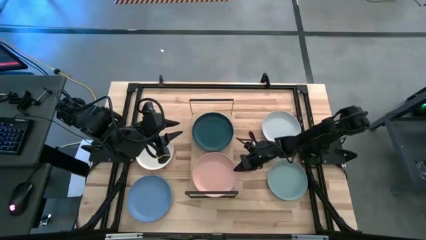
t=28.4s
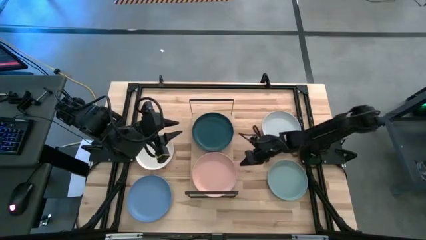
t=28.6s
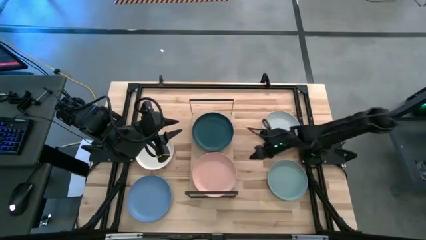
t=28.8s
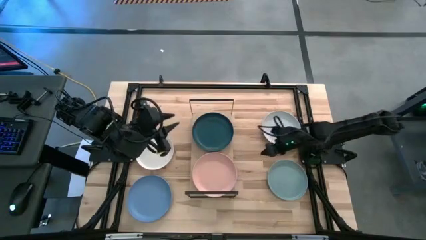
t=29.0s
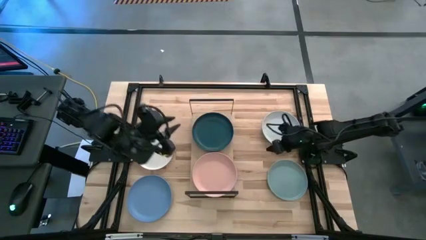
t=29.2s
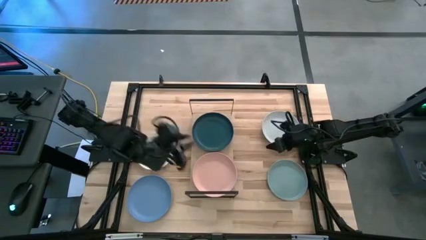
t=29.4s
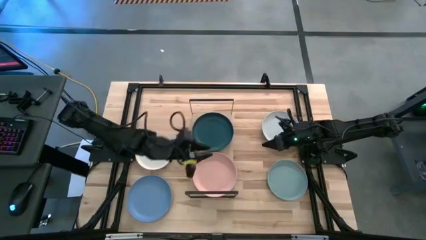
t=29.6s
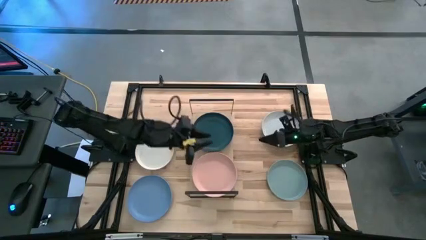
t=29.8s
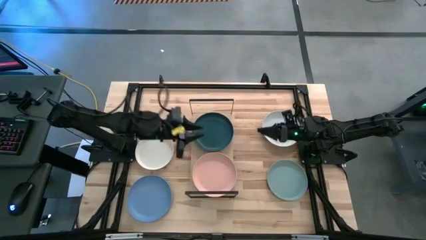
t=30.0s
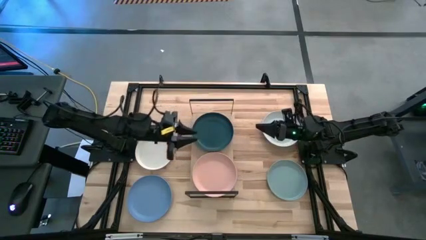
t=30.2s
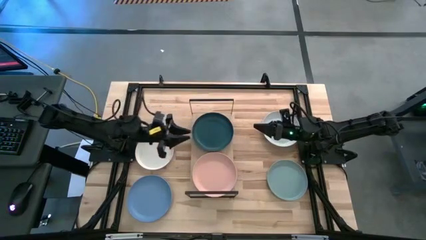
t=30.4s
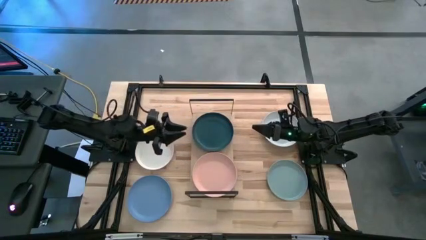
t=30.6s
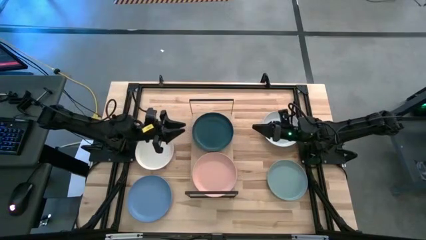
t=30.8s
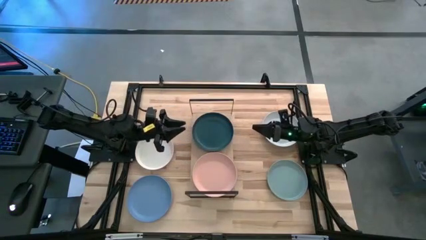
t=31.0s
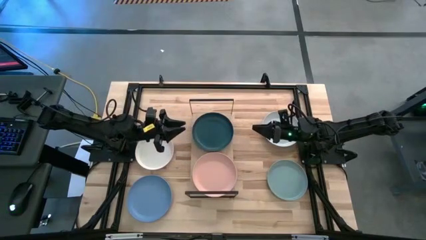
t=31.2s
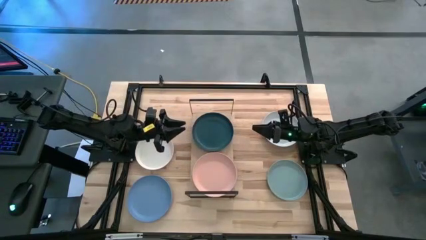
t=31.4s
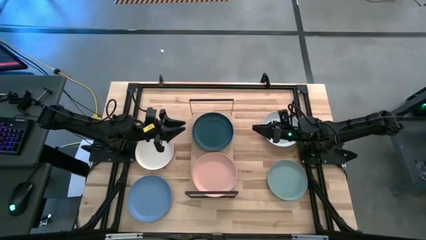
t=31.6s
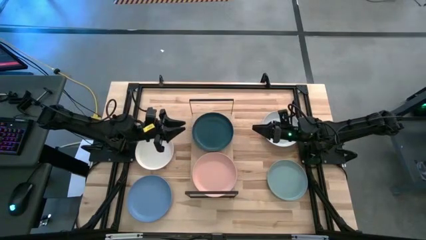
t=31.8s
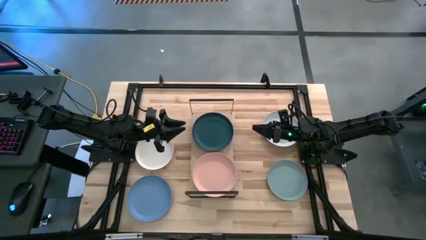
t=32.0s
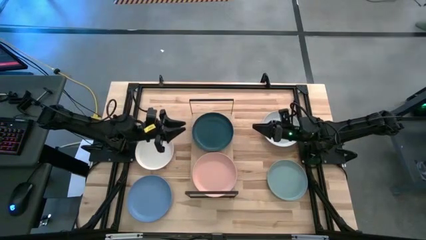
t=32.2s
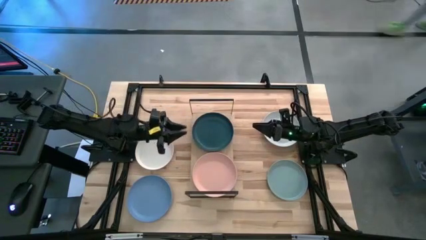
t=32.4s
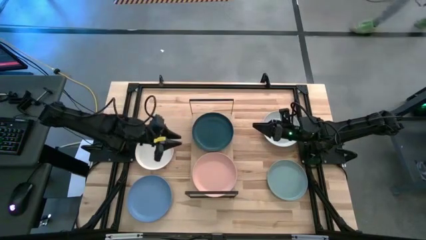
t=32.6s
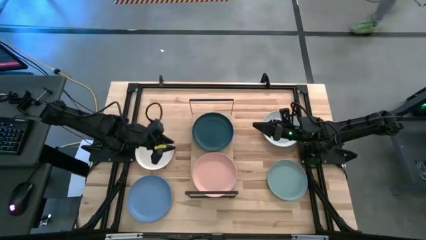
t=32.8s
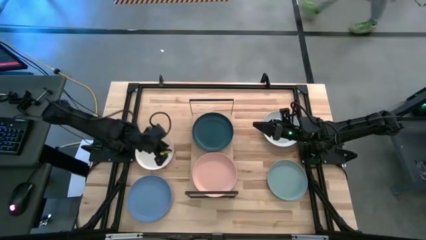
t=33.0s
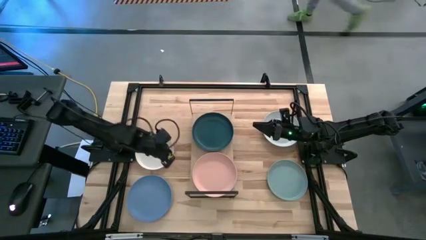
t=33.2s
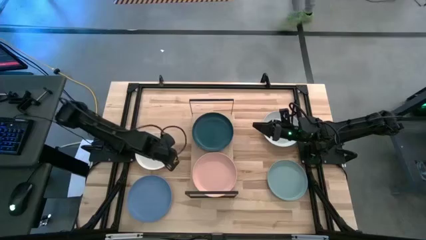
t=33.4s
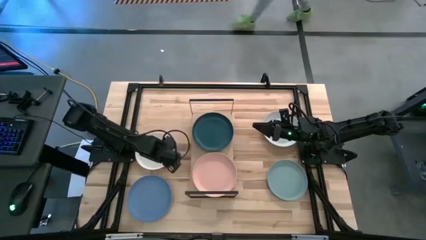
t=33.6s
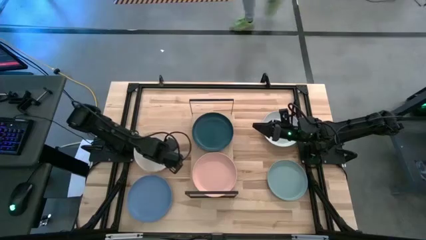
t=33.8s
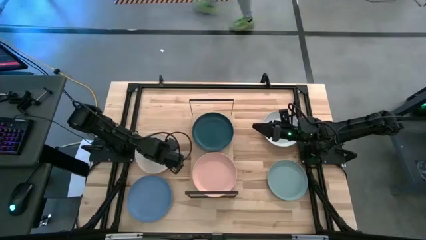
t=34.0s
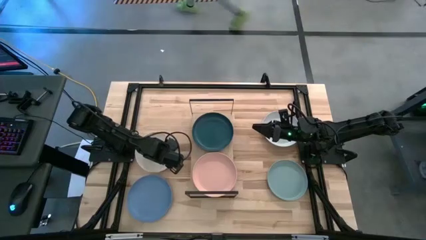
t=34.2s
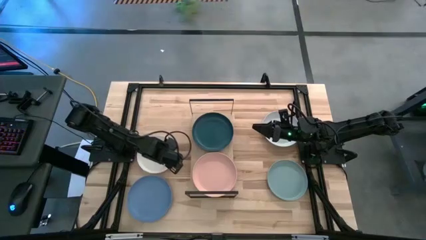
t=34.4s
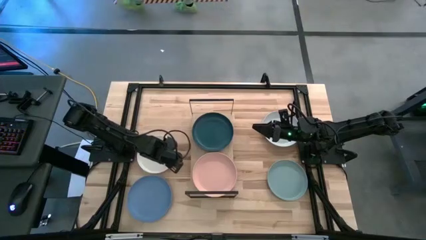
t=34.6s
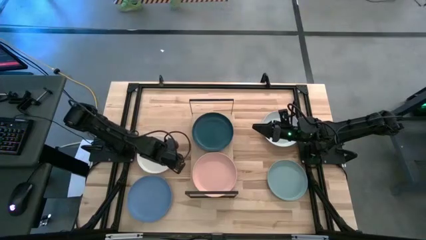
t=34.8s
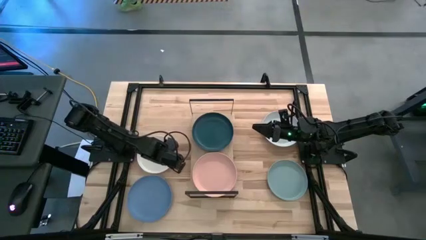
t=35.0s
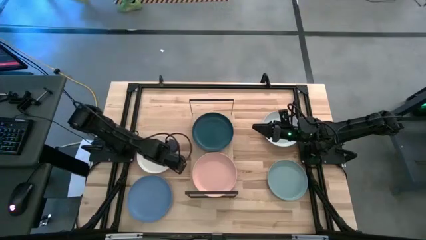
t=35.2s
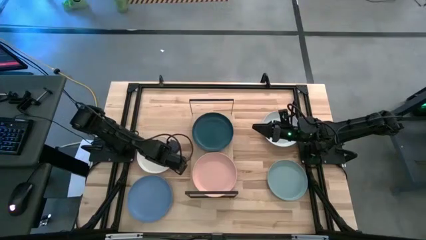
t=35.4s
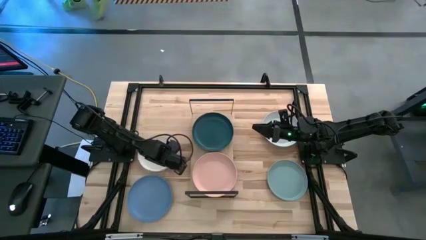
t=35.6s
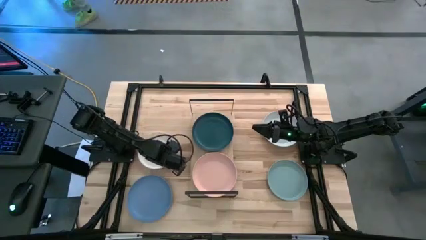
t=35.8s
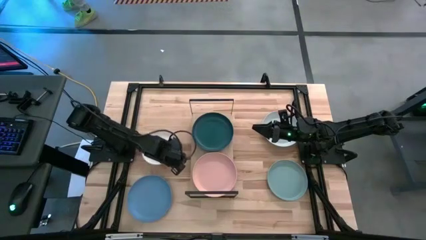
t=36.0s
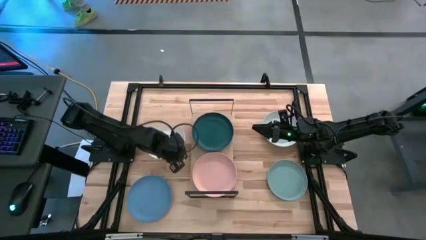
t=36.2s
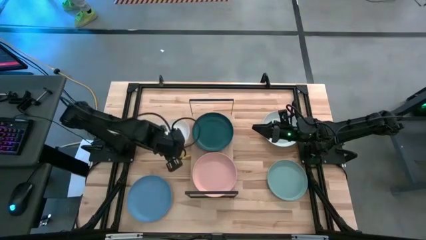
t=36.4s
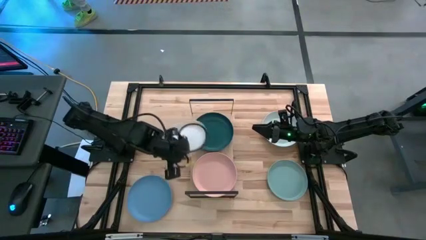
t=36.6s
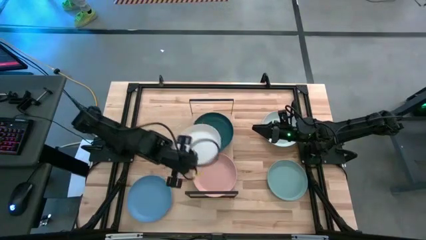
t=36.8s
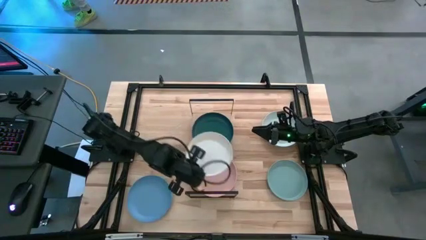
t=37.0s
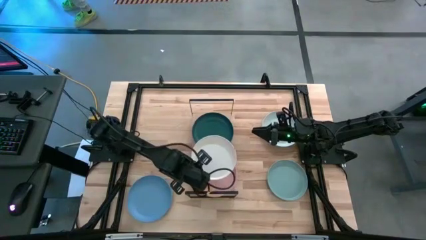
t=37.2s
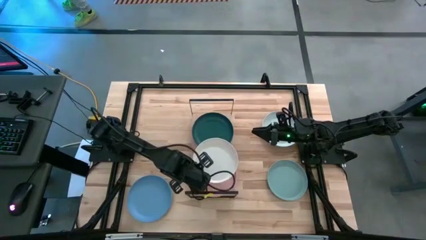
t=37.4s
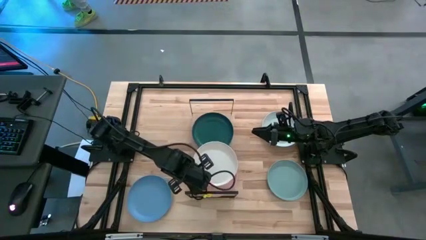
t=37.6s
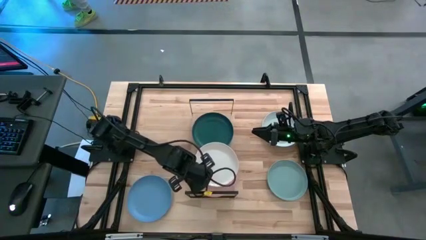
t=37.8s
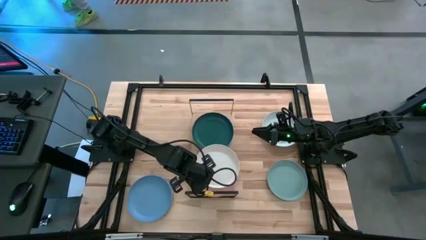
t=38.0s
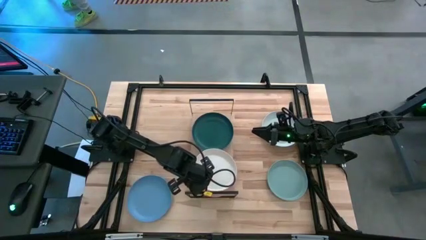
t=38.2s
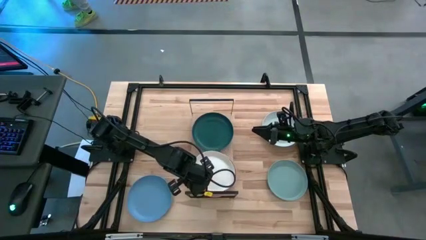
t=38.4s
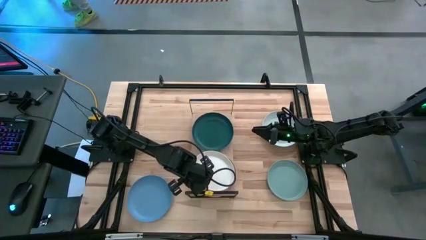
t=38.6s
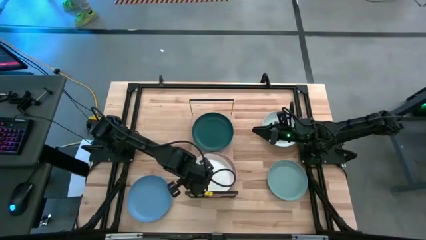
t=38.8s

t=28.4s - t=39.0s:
Task: Place and stack plates onto a shelf
Stack the white plate on top of the pink plate on the shelf

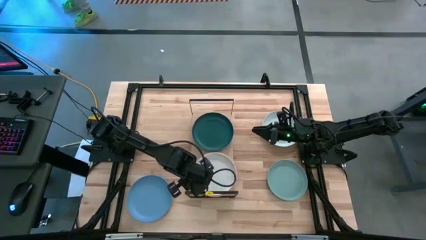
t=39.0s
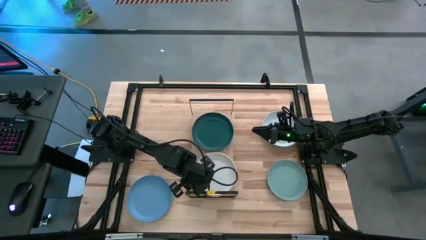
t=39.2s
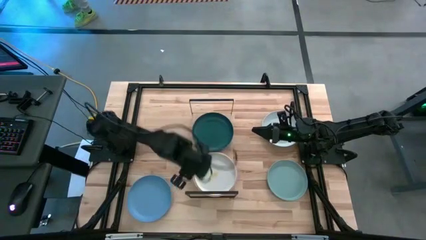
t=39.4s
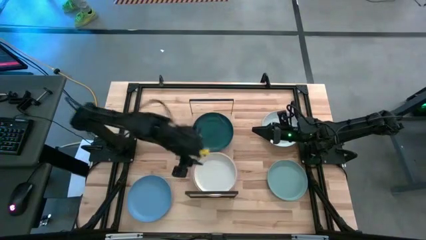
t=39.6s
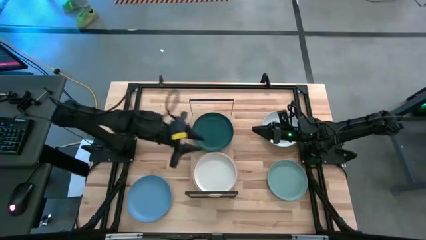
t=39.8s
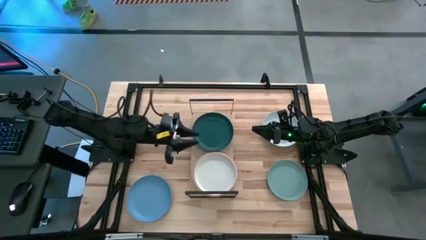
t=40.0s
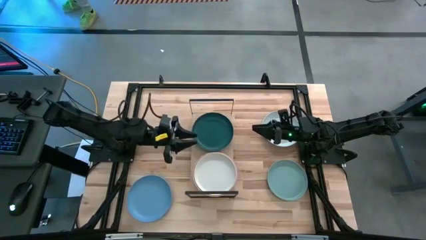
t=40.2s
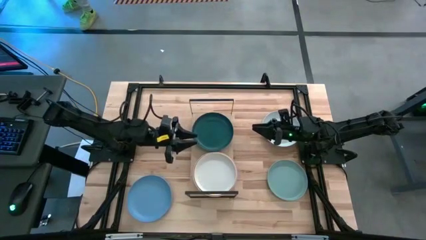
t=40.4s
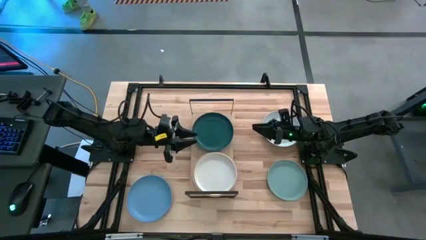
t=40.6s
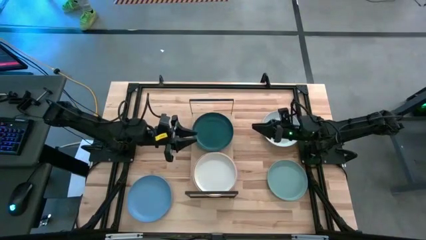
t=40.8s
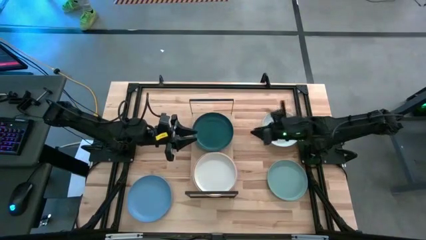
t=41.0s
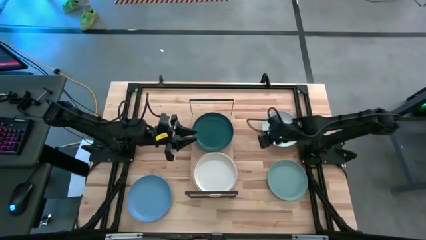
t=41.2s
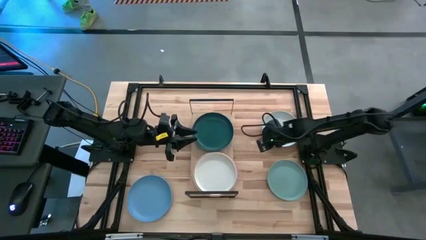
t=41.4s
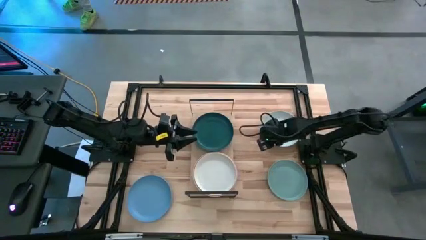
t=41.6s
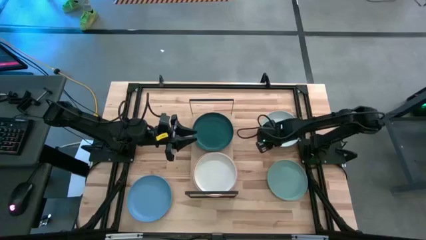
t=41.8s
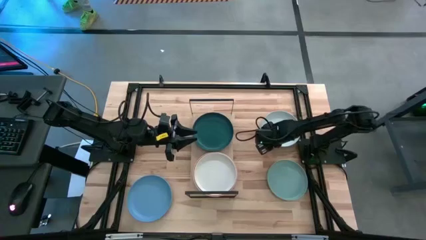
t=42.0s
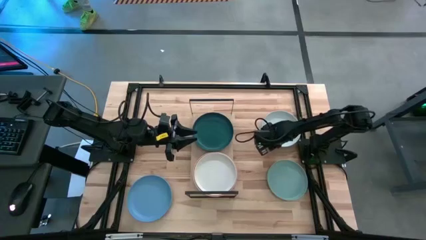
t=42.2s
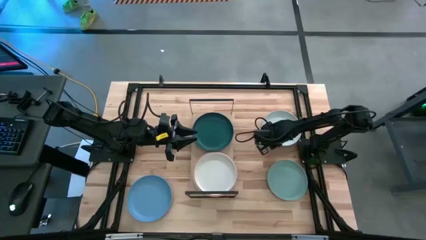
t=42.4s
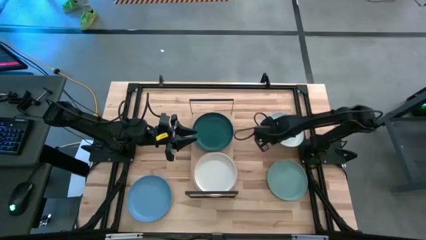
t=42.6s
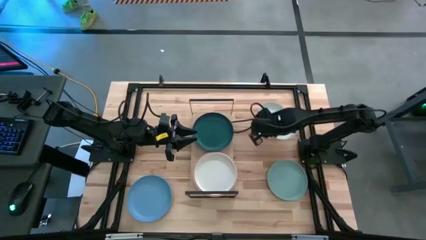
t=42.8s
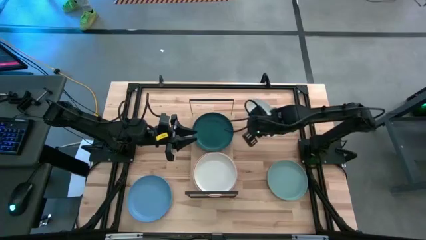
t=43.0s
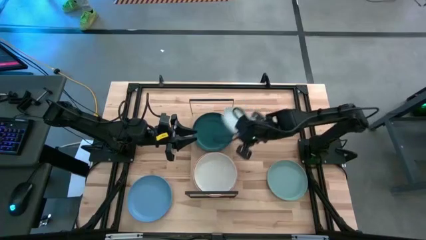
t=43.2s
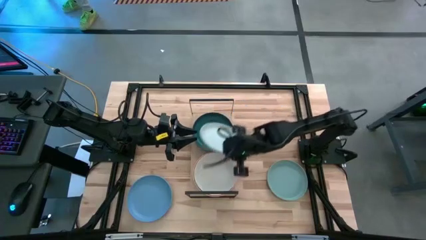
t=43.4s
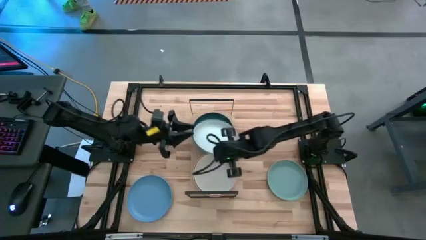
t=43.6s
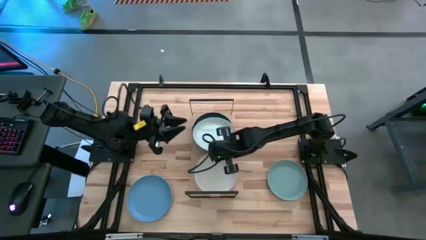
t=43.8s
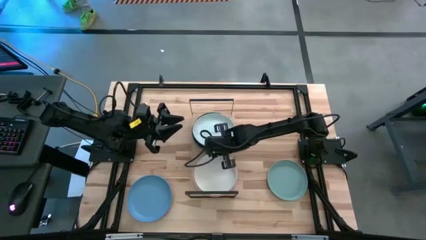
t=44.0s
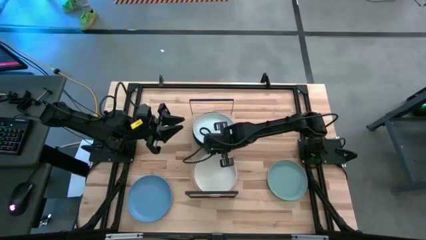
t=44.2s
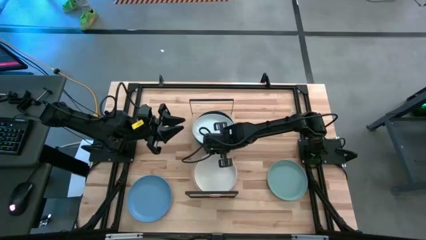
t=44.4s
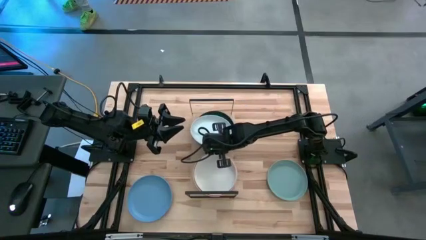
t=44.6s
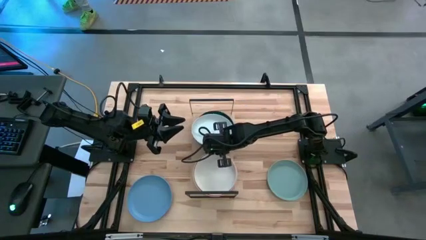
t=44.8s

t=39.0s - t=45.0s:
Stack the gray plate on top of the dark green plate on the shelf
